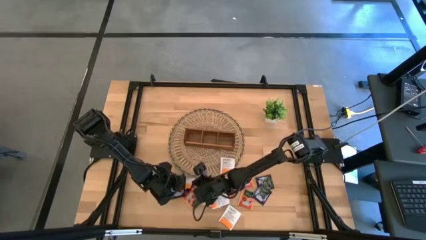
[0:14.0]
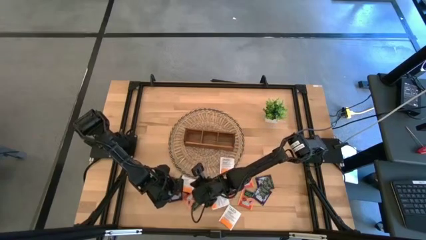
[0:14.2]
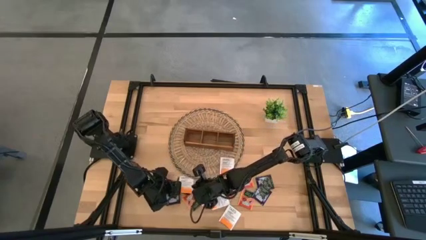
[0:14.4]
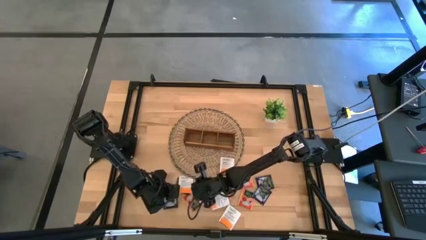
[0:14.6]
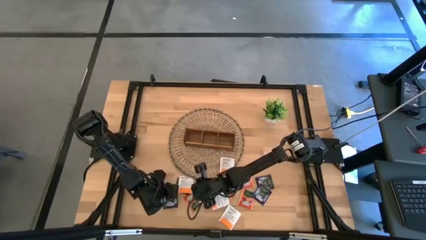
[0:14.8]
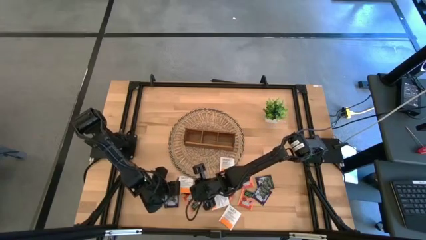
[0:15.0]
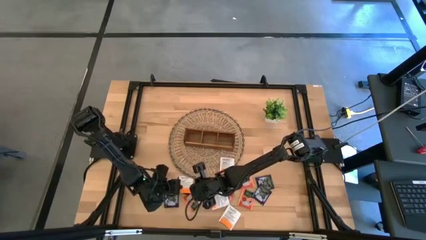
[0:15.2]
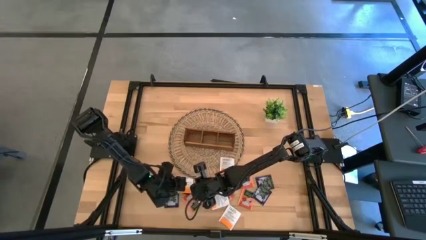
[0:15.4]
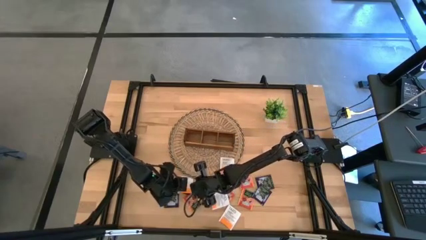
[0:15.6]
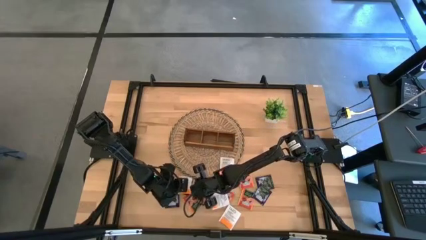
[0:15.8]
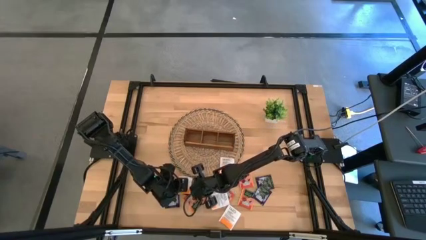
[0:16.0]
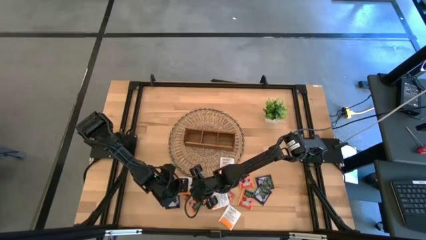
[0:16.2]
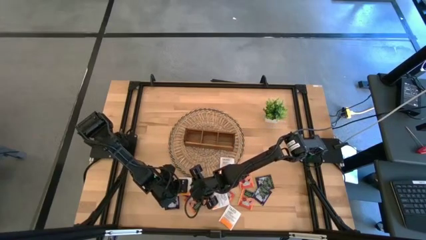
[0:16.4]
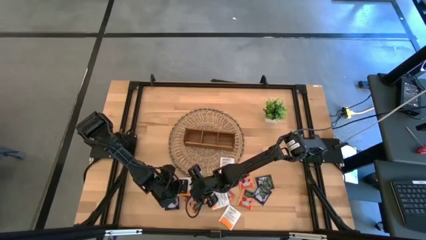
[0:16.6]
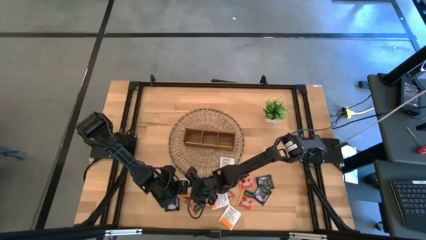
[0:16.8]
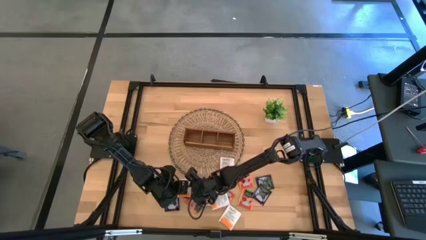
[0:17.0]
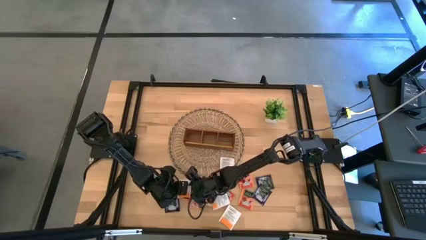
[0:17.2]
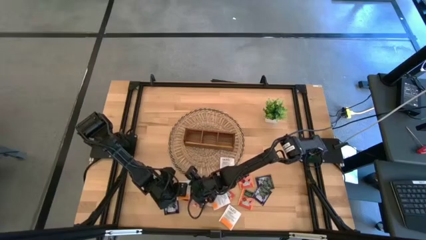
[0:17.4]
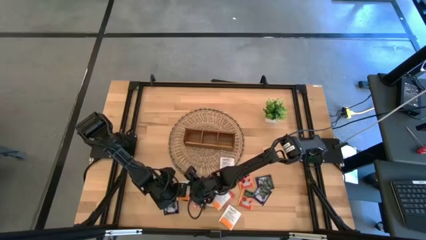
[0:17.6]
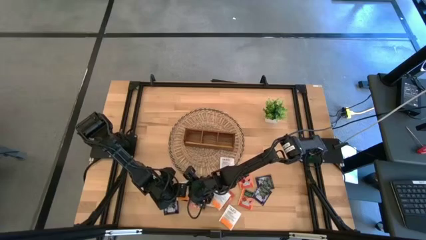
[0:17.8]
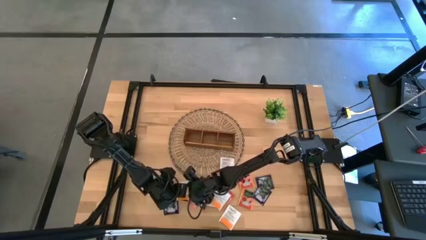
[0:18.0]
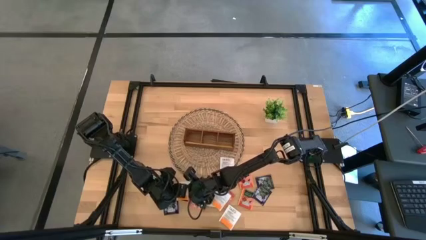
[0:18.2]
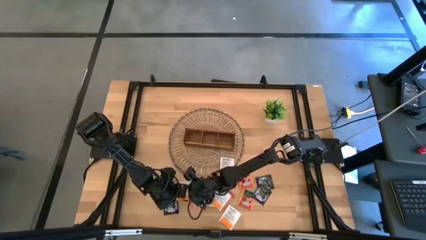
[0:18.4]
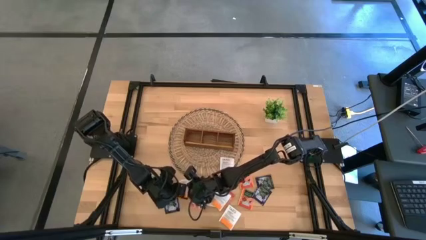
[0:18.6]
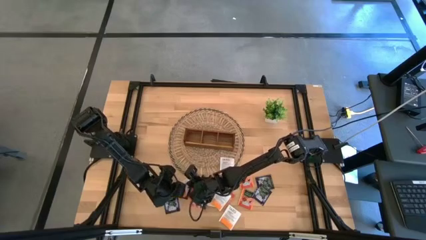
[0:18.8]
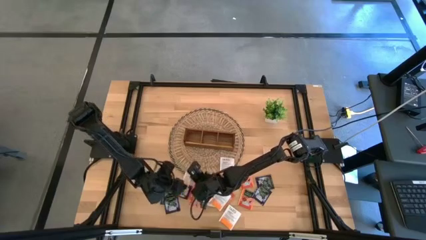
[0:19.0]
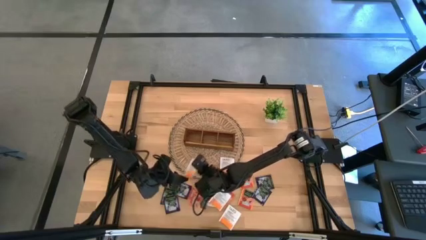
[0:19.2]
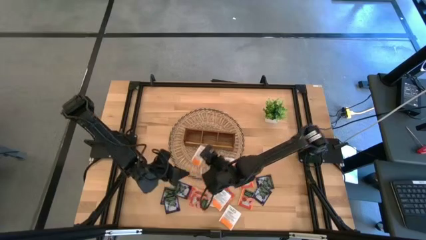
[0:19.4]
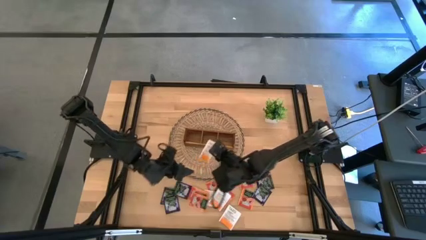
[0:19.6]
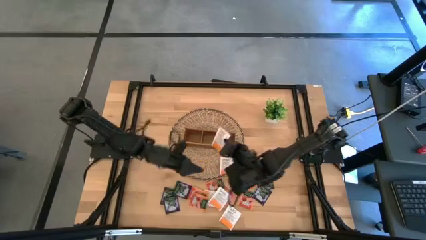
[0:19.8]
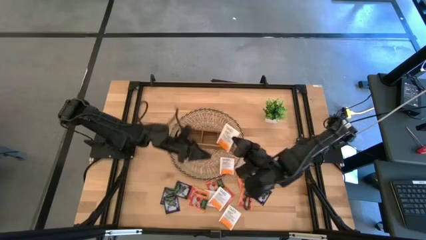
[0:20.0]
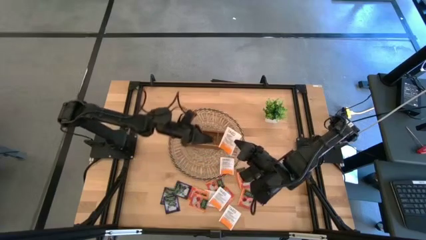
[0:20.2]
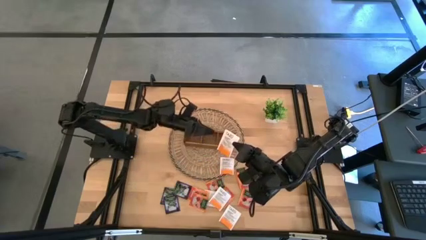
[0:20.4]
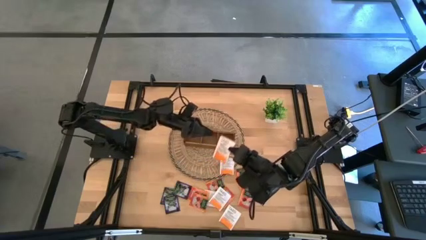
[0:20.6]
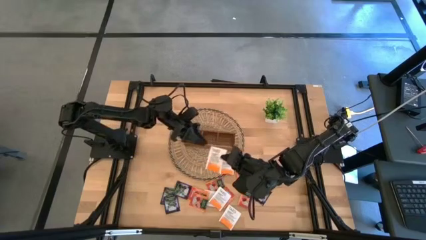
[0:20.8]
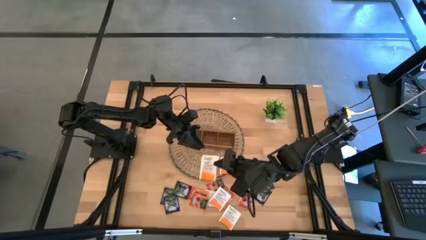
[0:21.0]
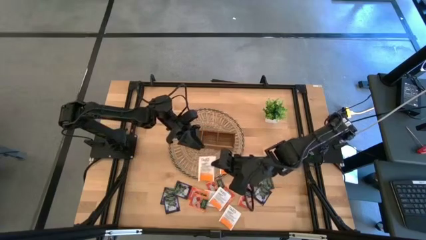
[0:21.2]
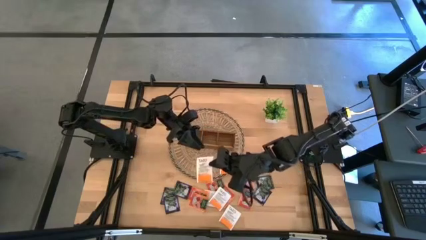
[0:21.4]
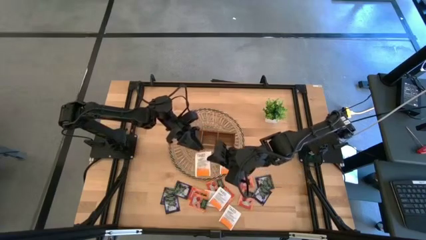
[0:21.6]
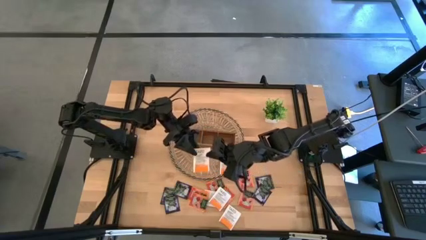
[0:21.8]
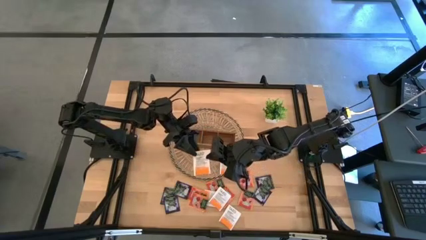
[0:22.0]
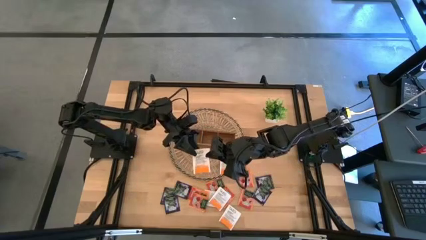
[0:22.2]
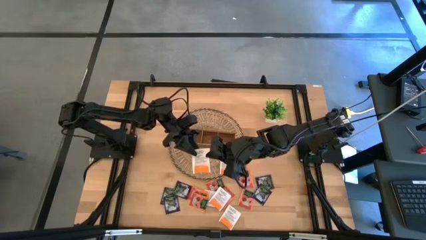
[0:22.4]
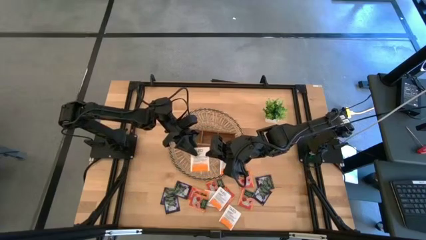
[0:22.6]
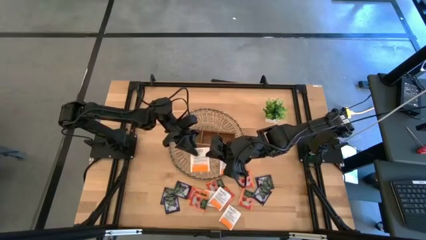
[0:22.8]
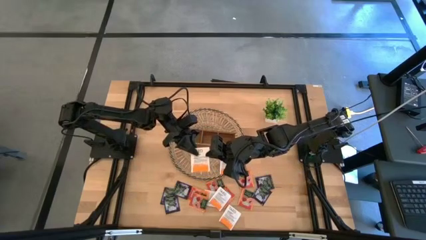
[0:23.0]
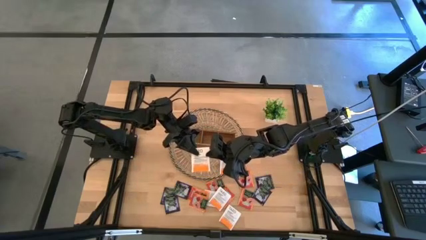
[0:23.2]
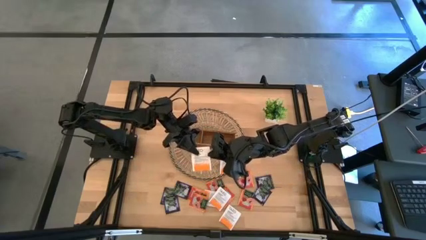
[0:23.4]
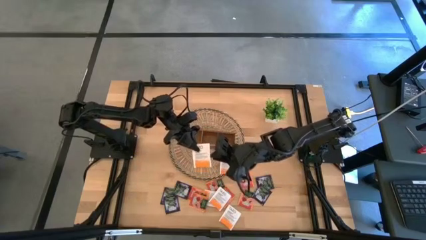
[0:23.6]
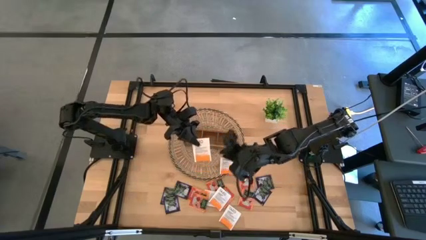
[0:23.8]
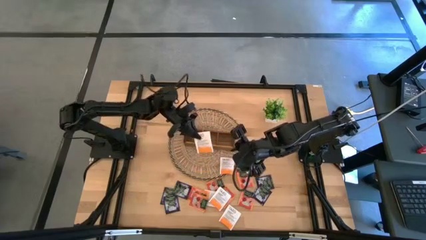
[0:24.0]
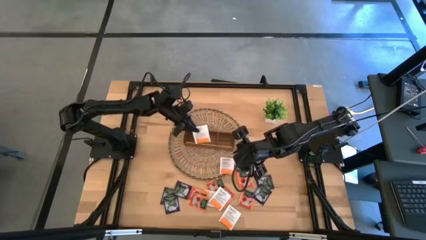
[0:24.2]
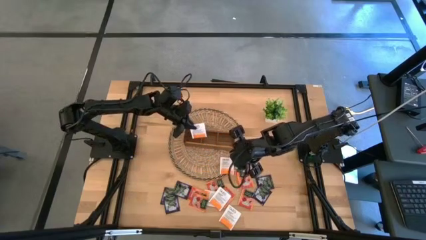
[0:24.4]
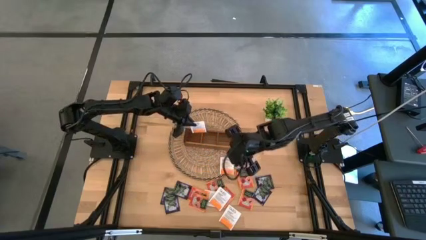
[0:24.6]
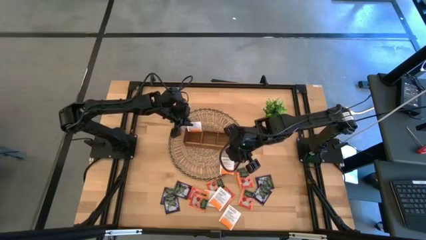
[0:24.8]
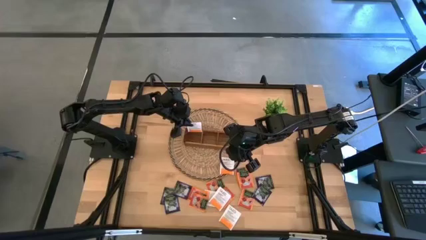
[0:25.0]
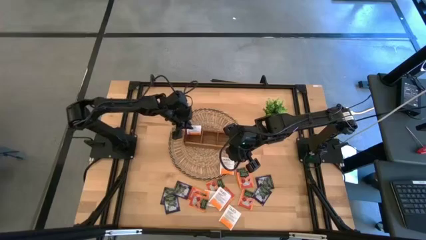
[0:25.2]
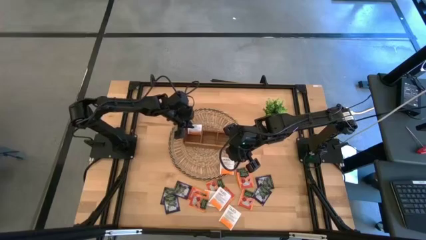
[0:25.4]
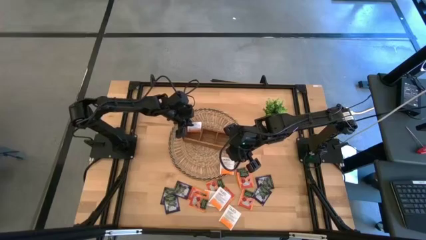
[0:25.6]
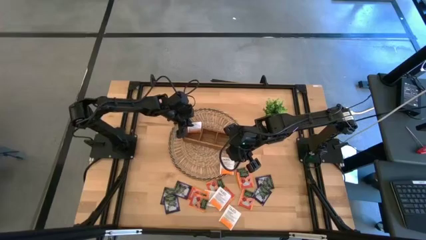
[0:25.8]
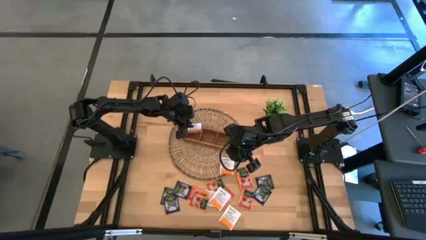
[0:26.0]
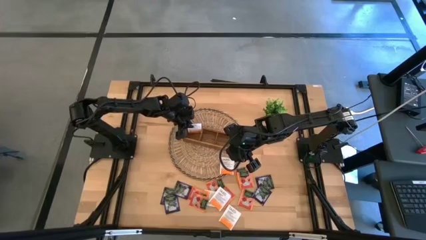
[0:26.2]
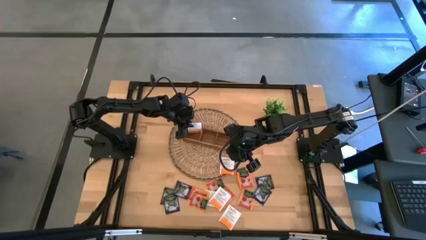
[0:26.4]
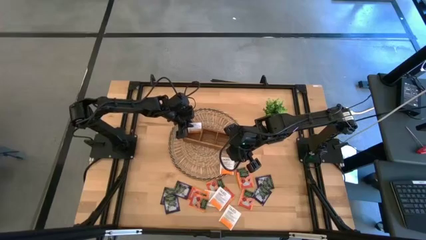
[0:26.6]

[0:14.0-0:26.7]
Task: Pick & Place Tea
Put the white tea bag into the left section of the wooden organizer
